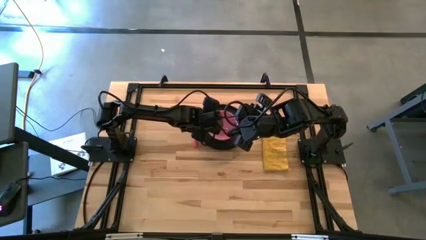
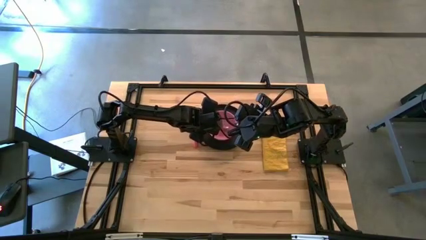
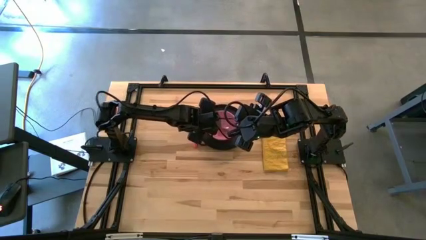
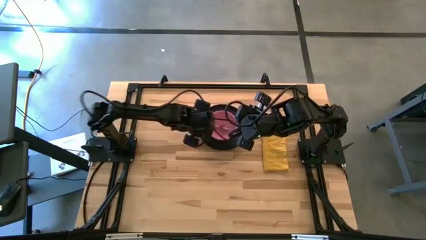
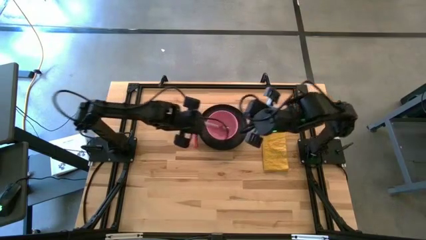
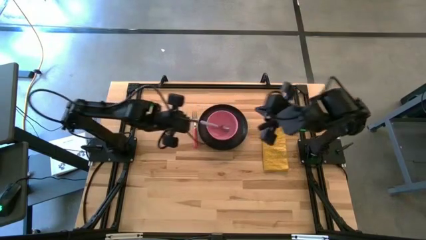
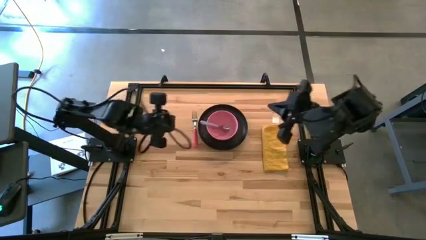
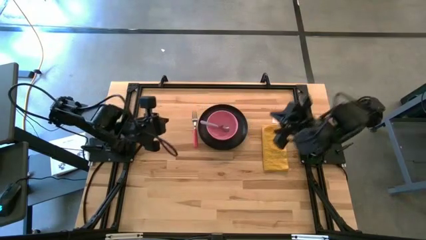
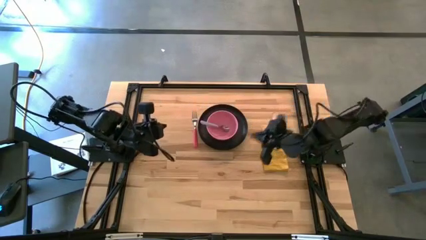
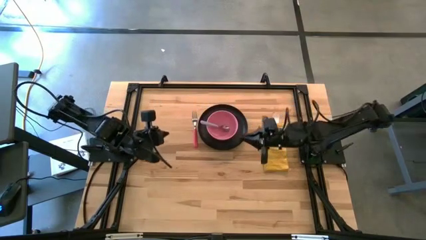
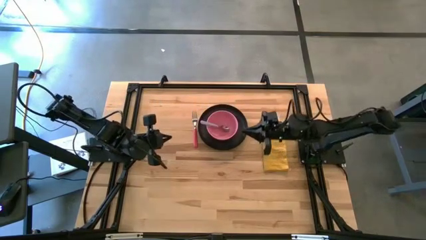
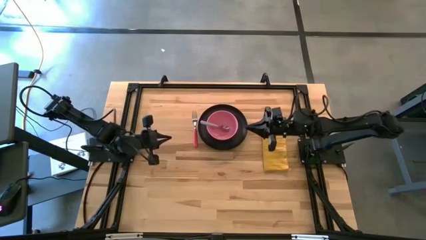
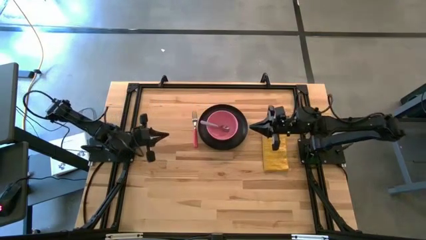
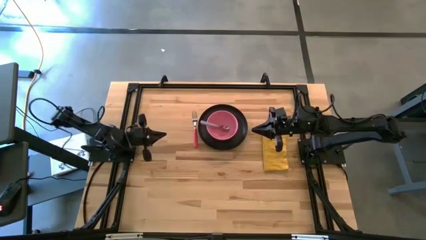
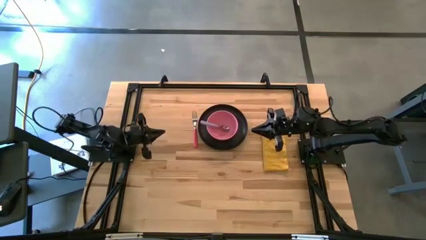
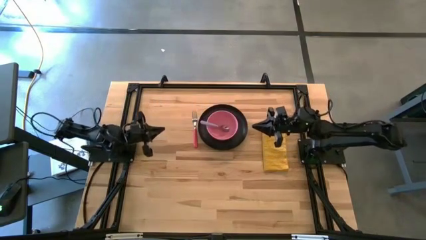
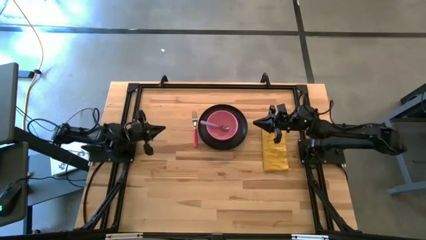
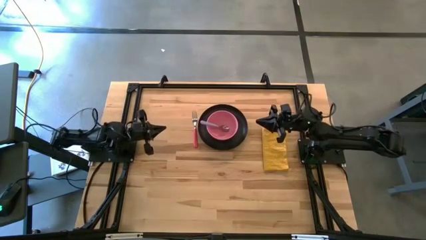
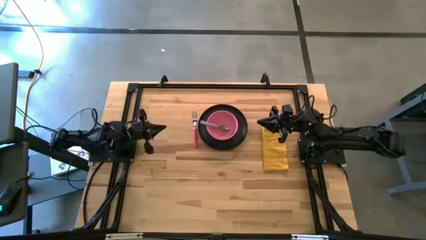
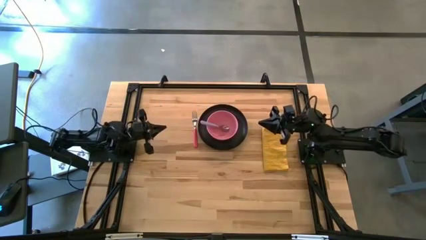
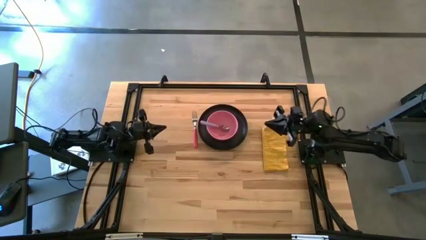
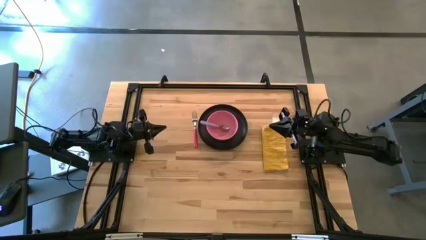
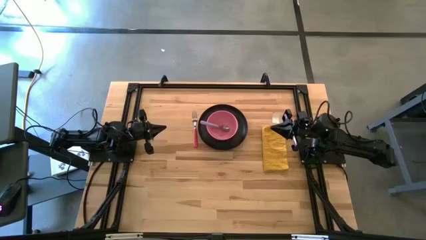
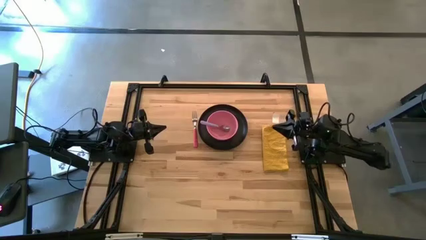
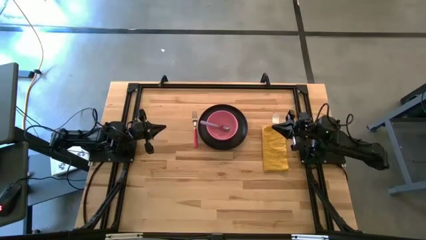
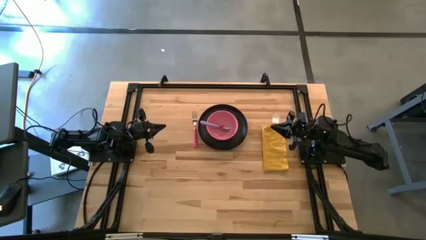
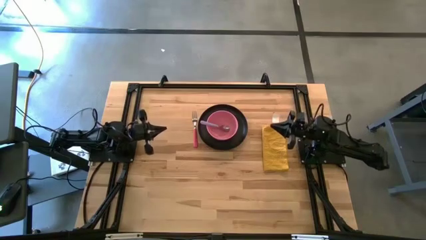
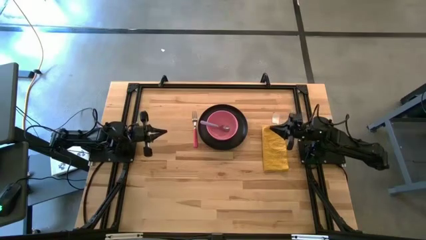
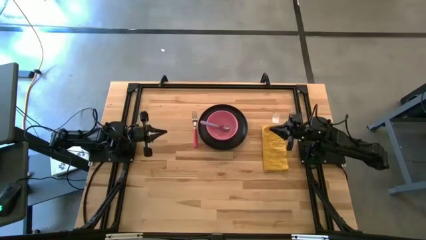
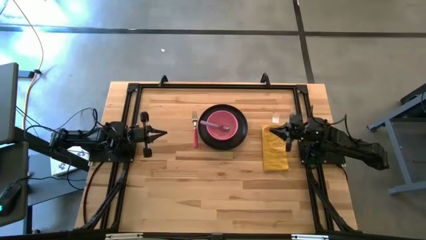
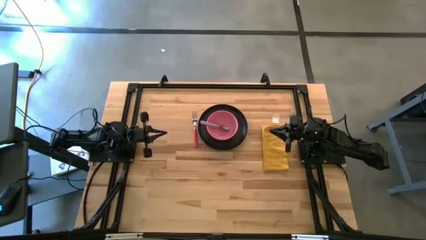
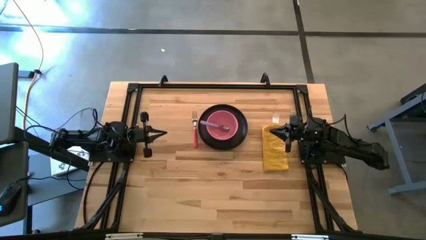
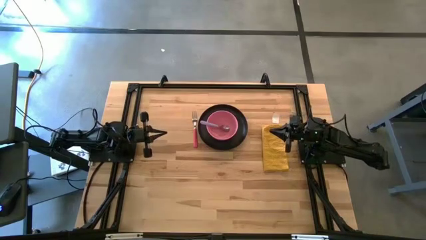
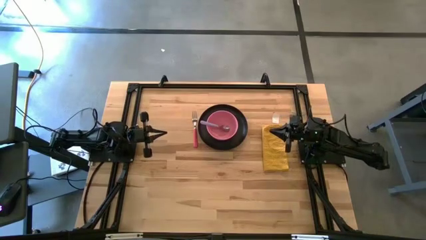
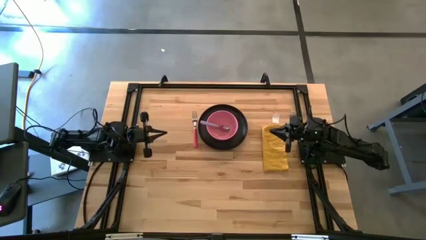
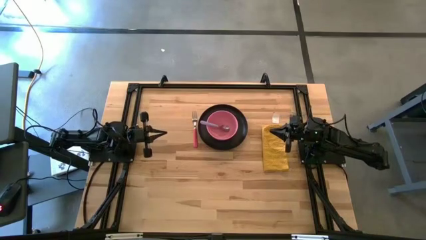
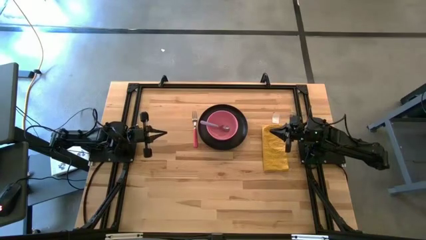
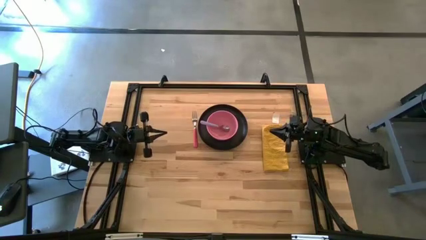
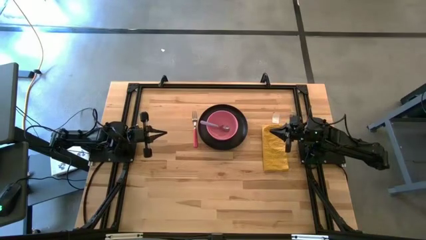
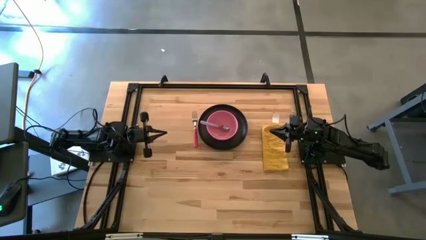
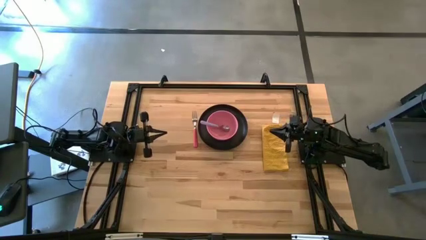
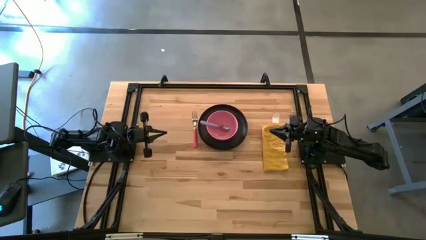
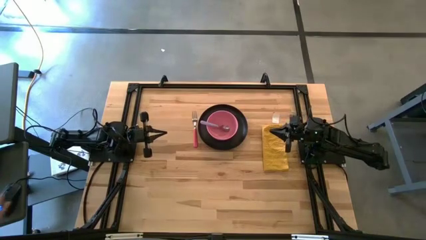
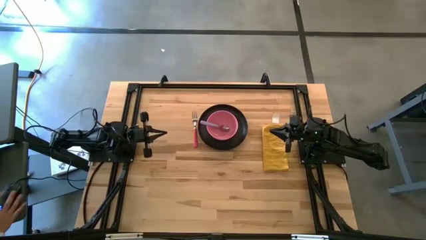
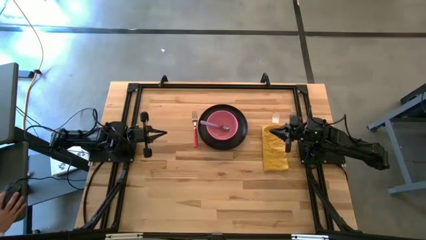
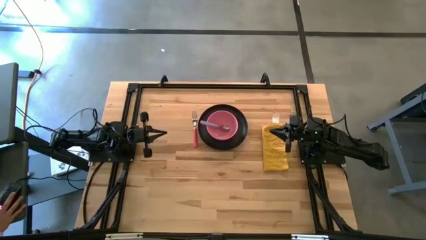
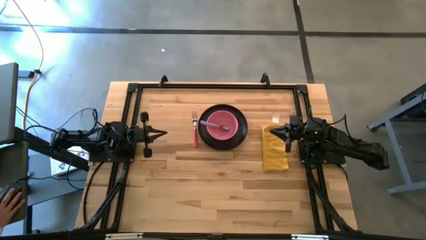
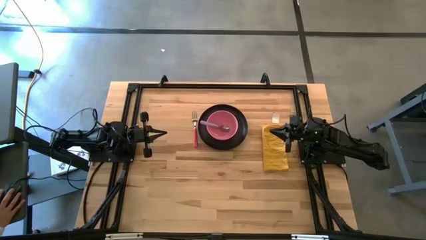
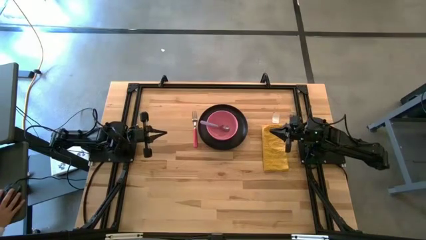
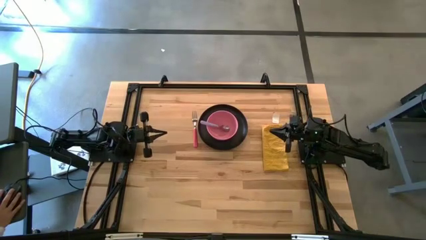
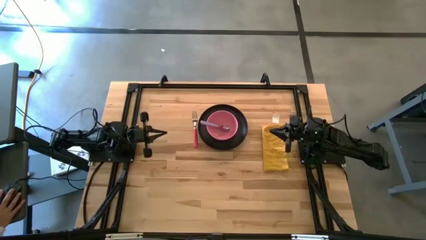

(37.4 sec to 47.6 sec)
Task: Set table place
Return to Home Position
